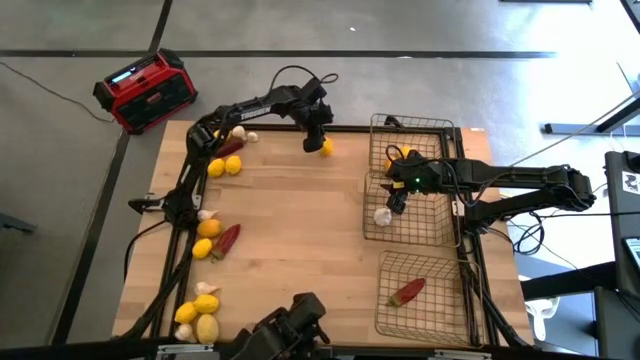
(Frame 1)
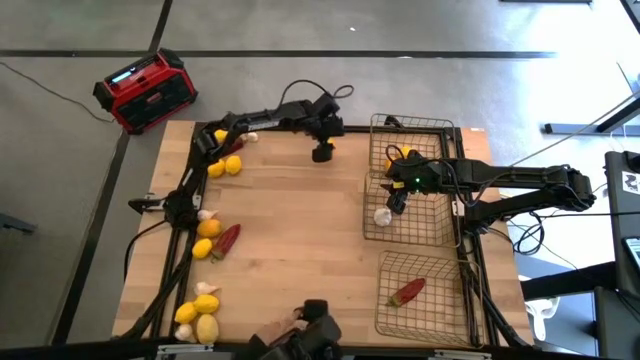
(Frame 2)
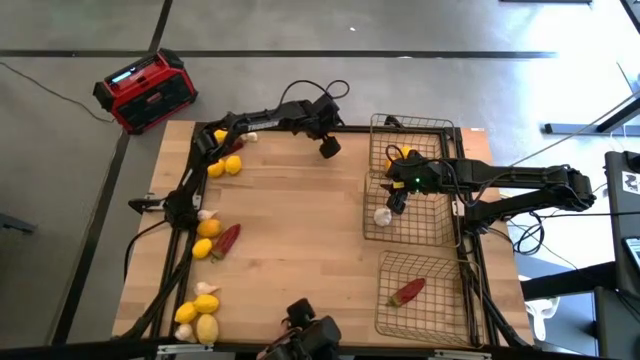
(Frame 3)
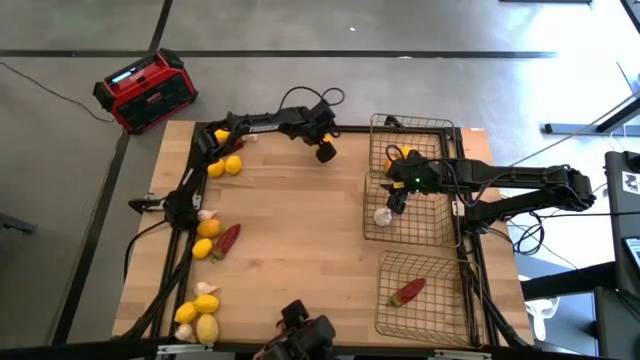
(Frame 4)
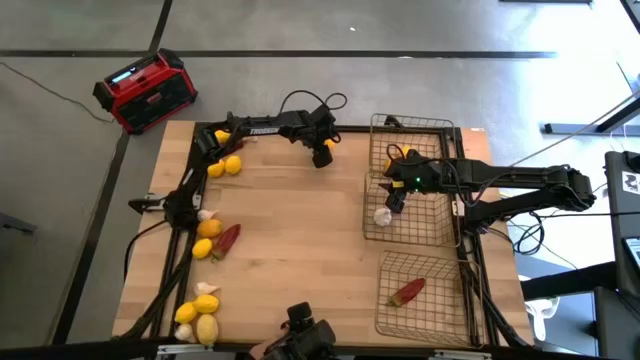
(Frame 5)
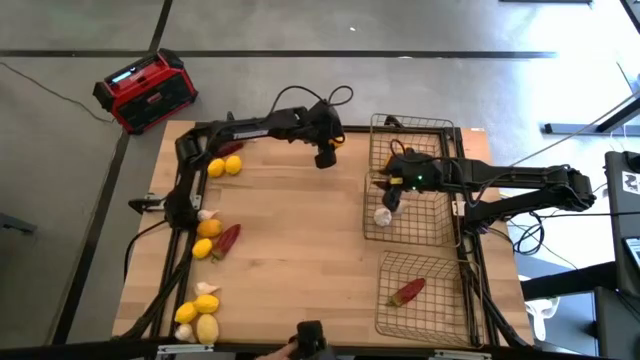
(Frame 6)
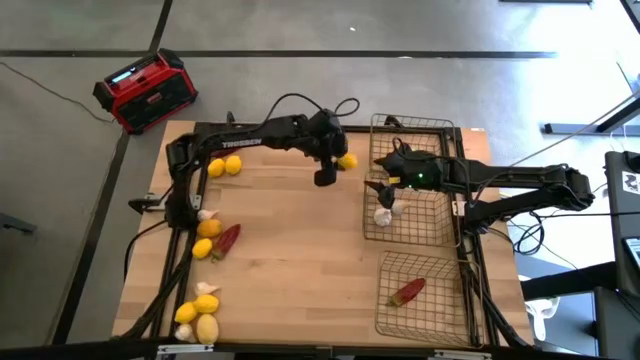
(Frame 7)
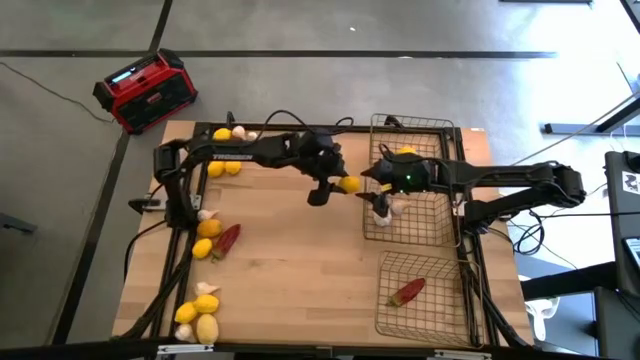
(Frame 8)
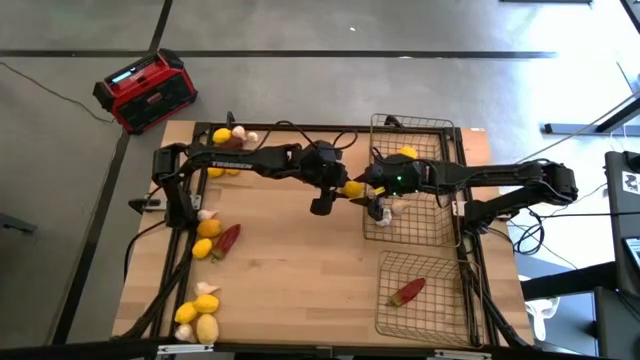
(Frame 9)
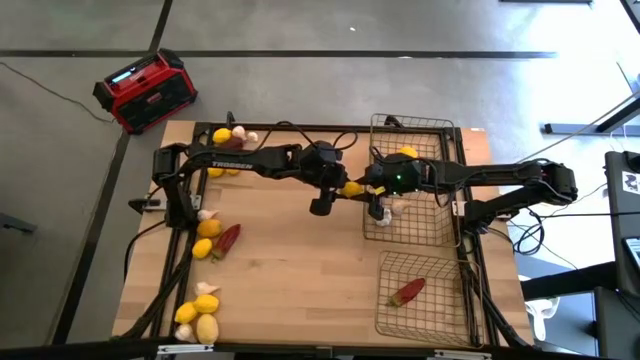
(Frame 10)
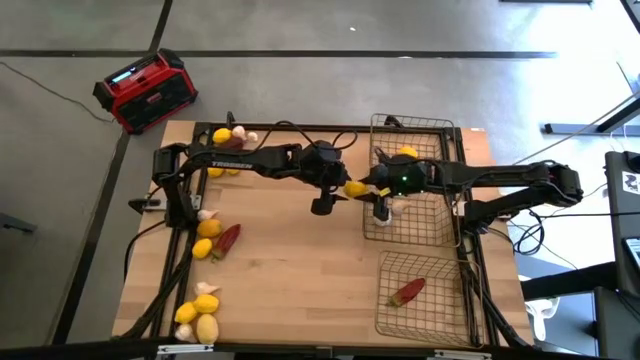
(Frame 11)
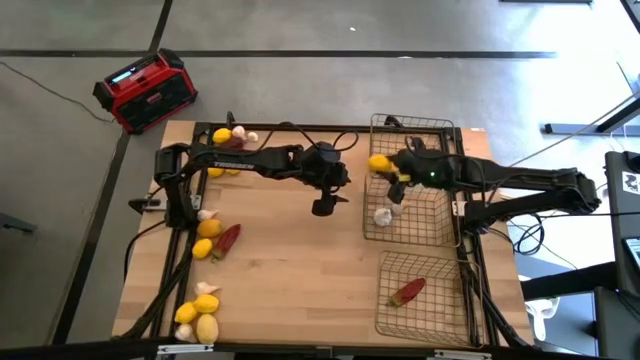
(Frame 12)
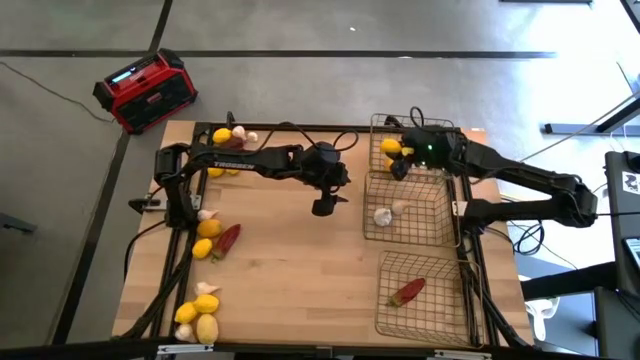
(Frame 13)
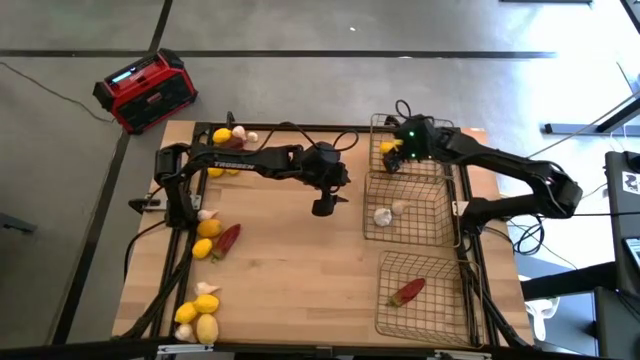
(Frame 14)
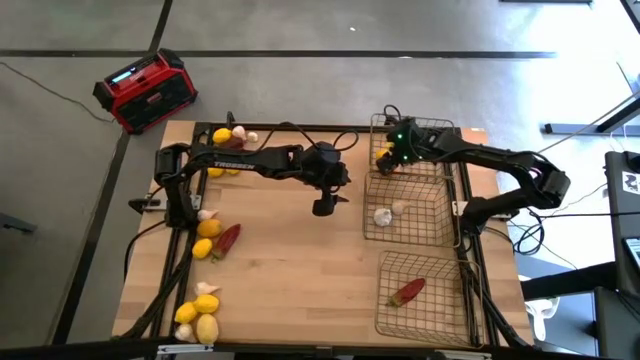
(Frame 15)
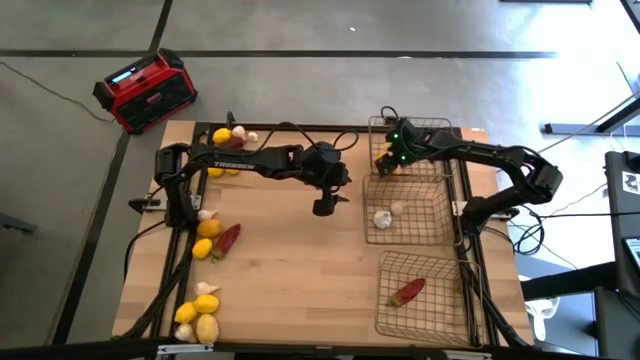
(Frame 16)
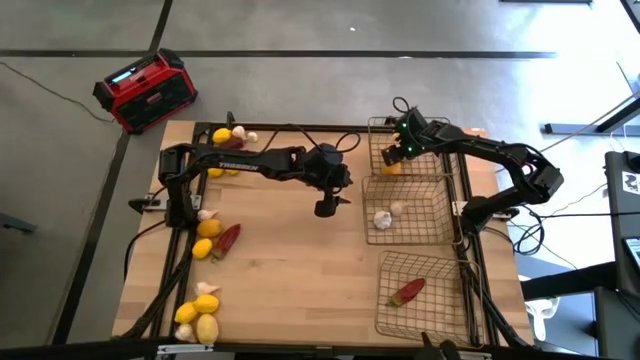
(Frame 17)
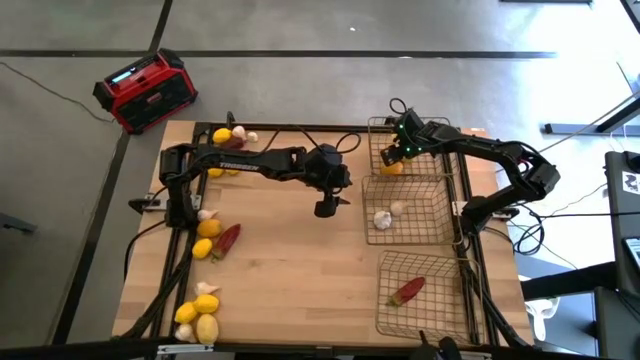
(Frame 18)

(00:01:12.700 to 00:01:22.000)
Task: Sort produce into baskets
Put the yellow lemon into the top wire basket

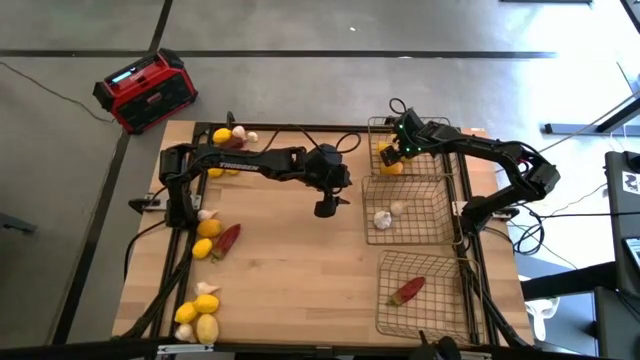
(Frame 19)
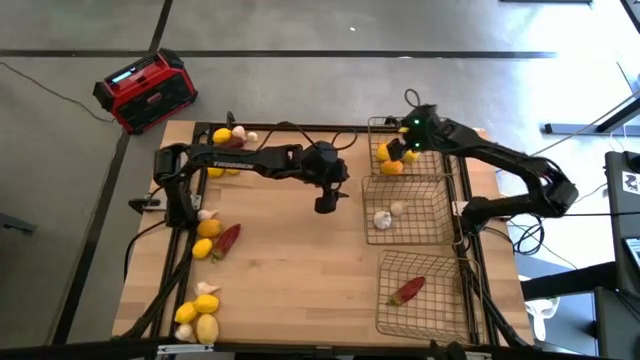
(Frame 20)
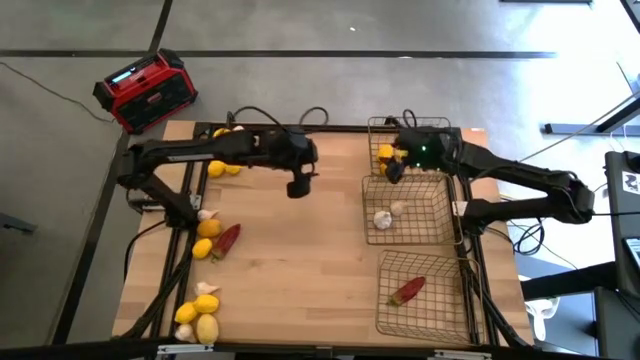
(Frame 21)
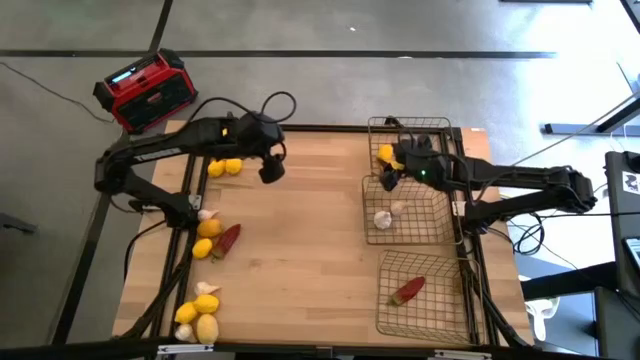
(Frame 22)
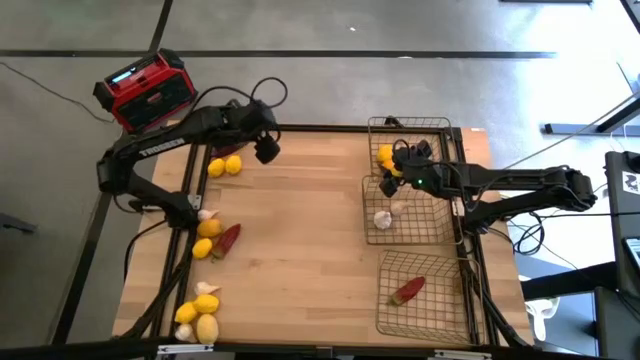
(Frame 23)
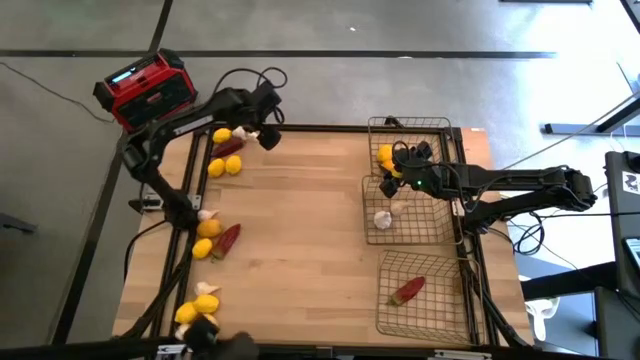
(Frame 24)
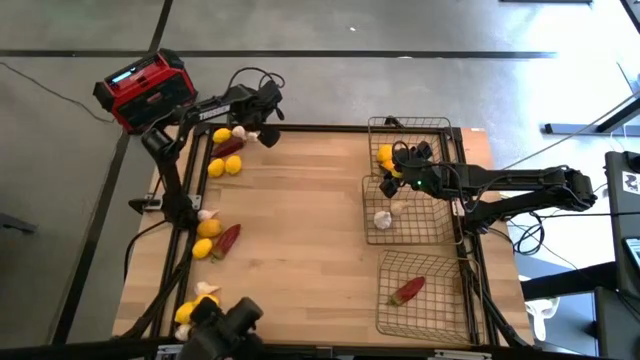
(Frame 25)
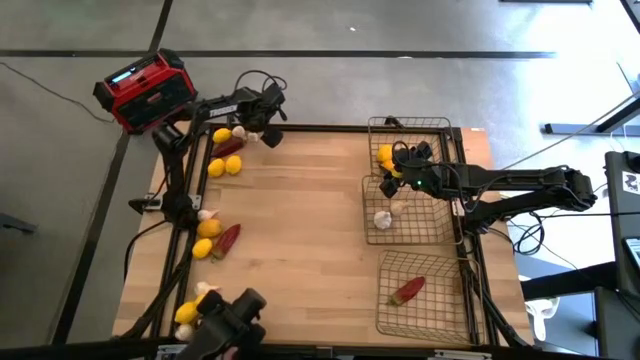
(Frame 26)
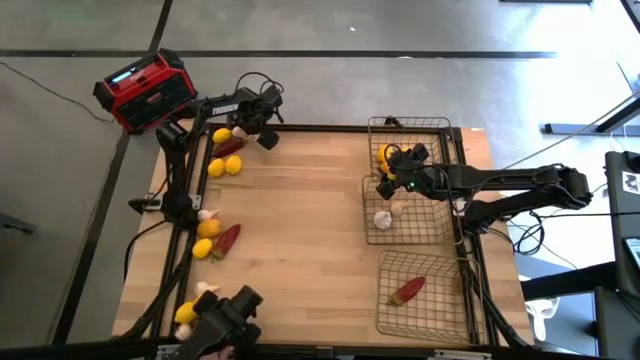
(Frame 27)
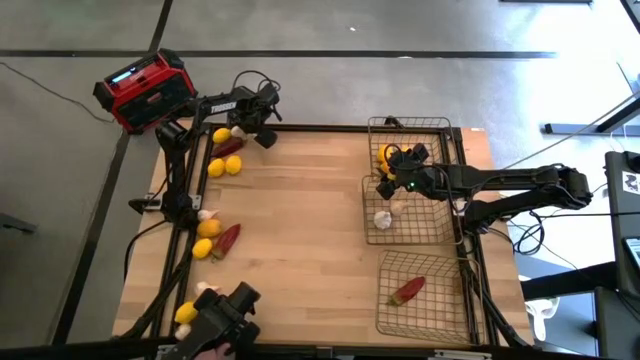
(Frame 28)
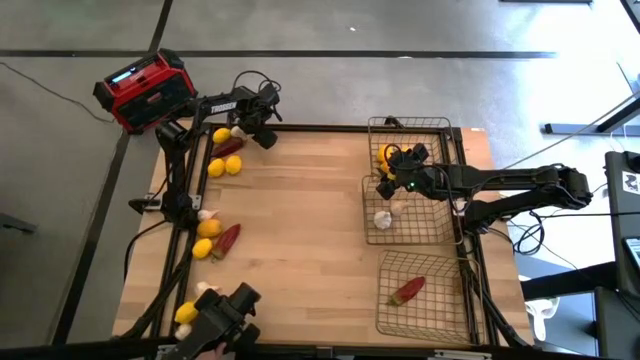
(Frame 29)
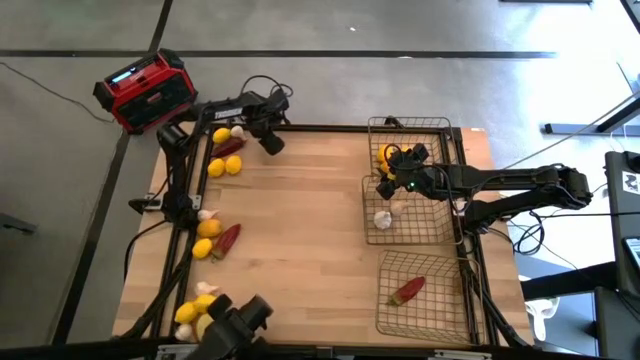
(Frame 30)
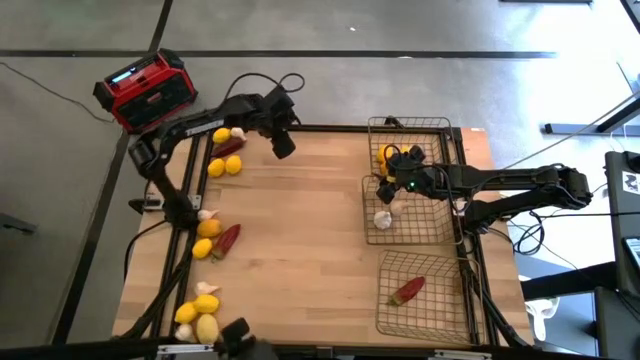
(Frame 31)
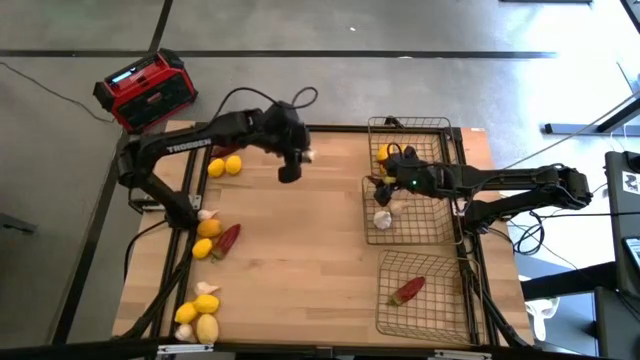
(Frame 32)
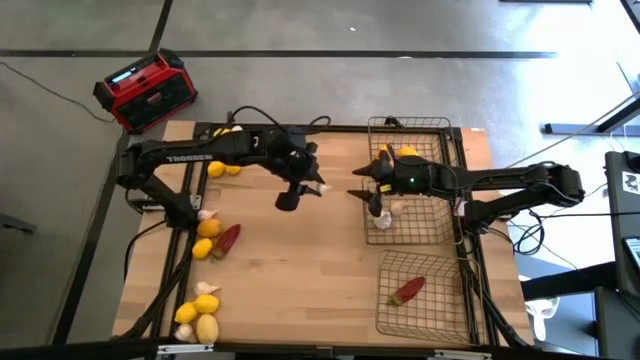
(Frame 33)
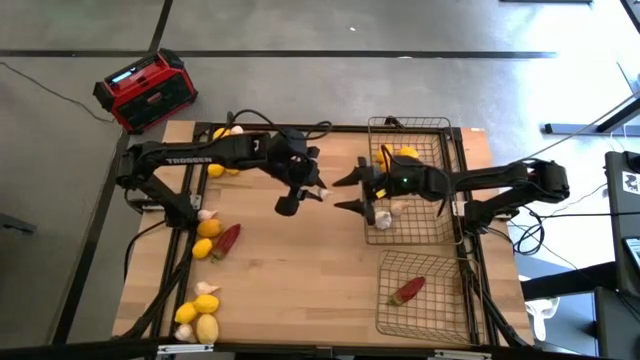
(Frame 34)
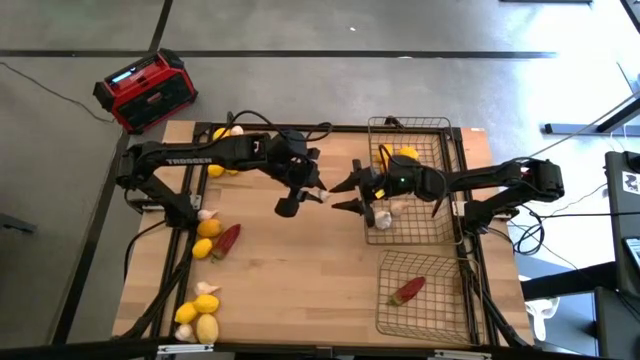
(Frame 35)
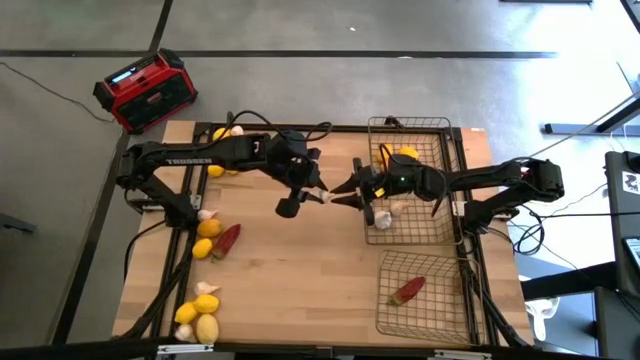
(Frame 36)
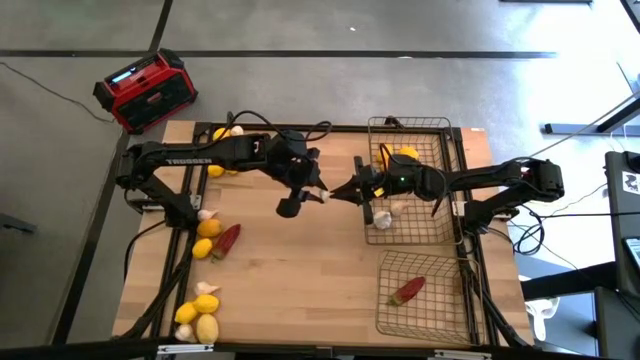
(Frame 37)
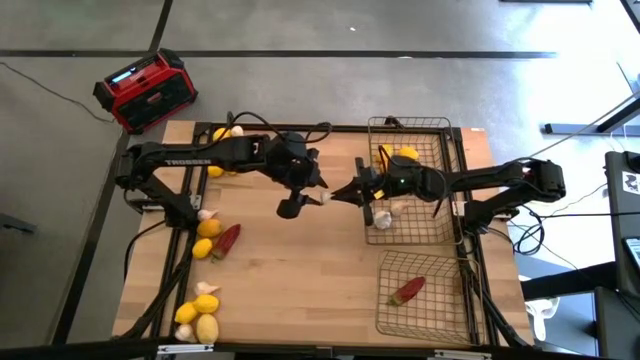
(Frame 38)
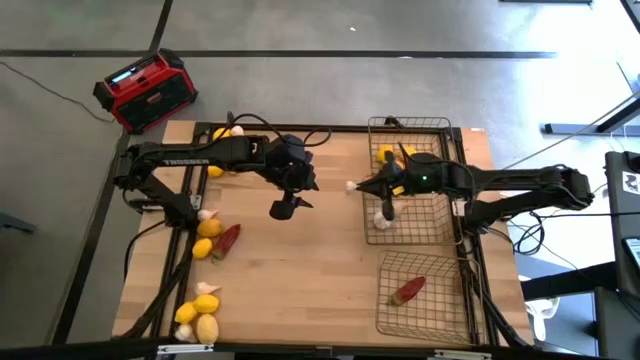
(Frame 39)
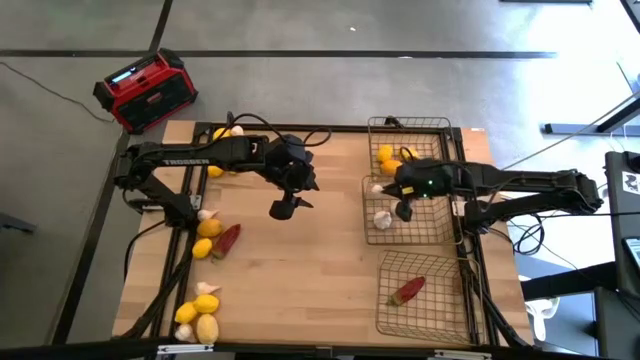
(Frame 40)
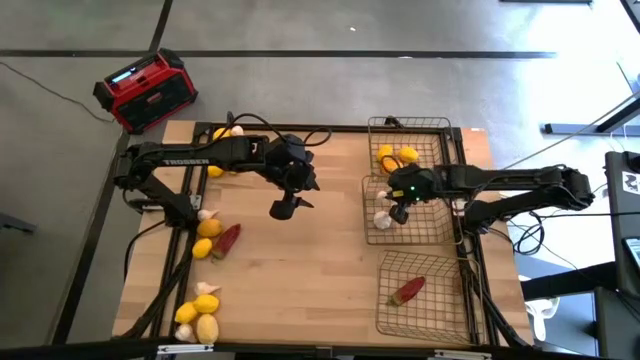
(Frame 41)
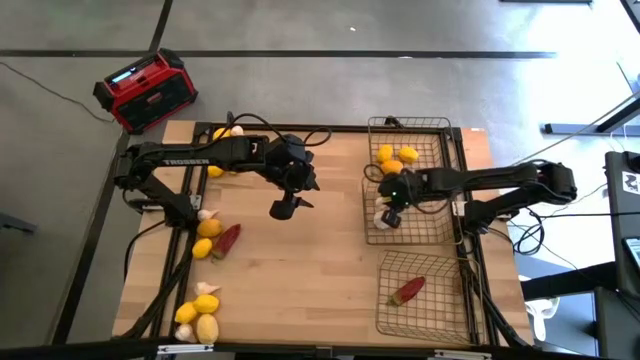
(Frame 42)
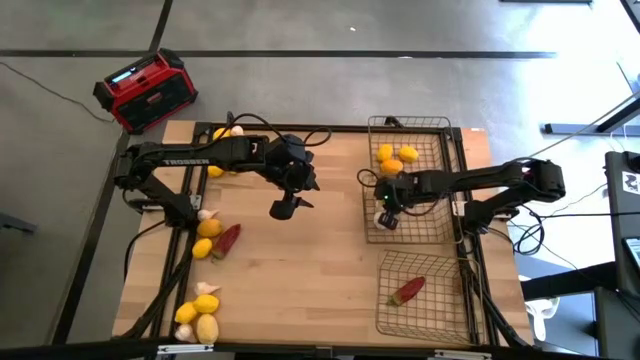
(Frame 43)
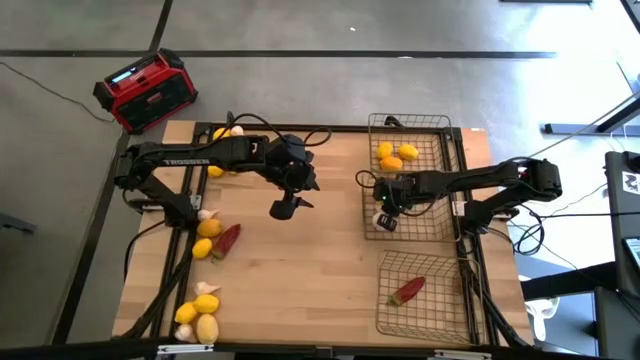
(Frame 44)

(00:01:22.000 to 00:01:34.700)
Put the white garlic into the middle wire basket
